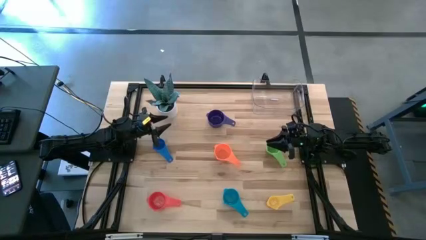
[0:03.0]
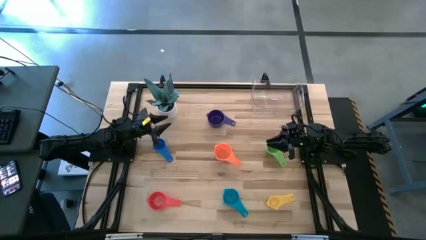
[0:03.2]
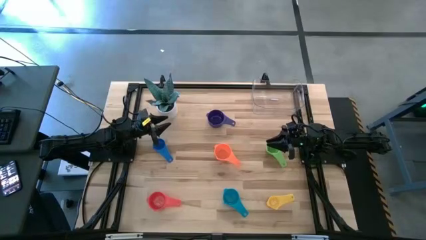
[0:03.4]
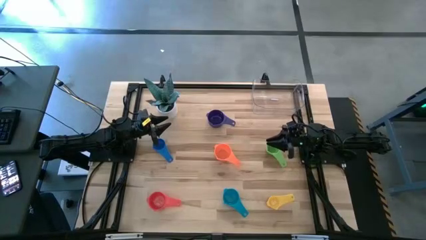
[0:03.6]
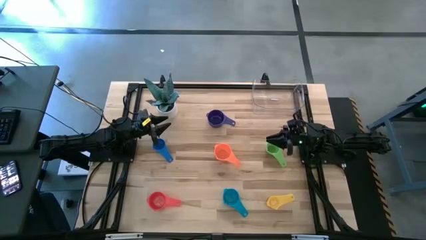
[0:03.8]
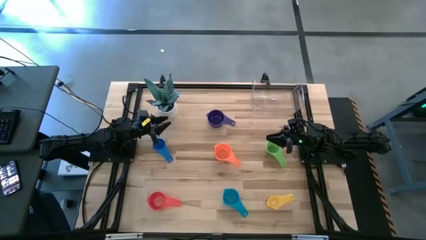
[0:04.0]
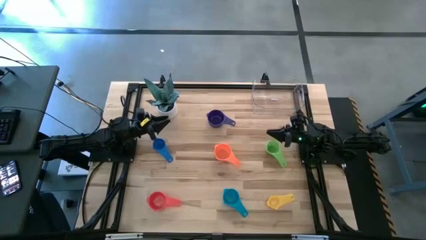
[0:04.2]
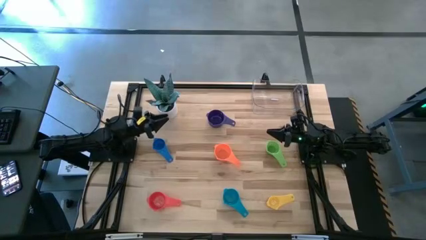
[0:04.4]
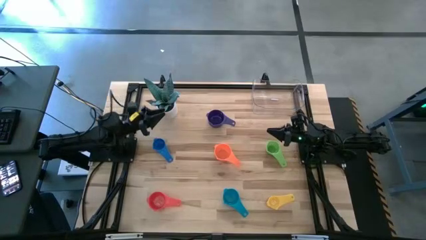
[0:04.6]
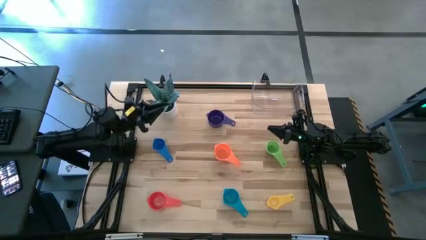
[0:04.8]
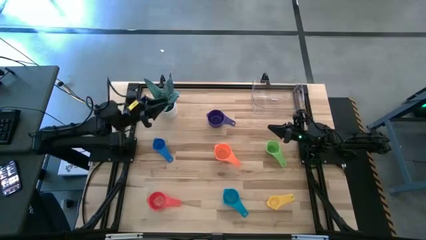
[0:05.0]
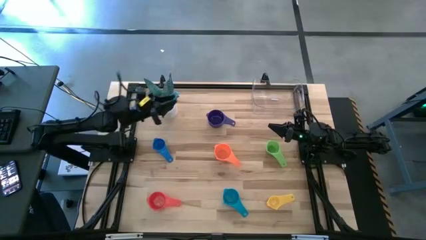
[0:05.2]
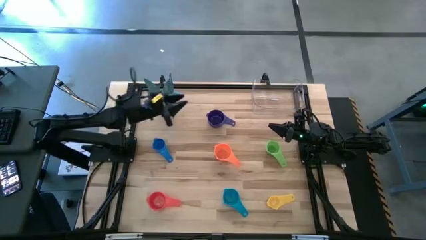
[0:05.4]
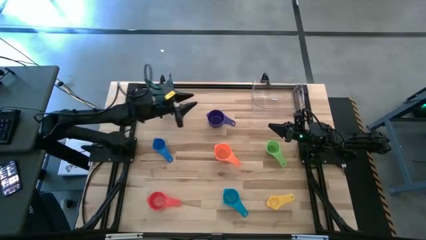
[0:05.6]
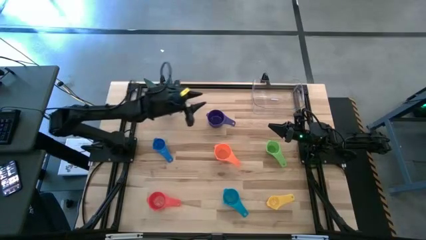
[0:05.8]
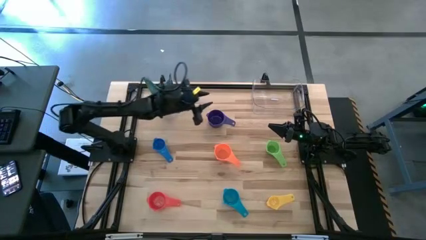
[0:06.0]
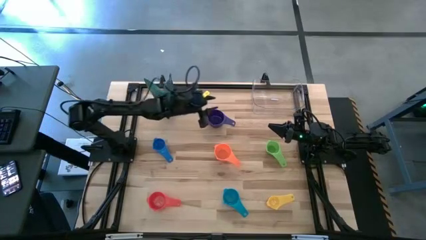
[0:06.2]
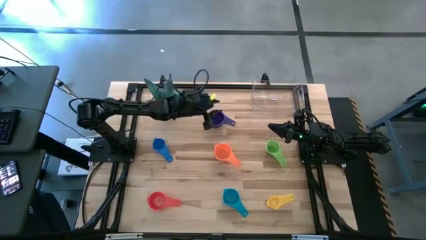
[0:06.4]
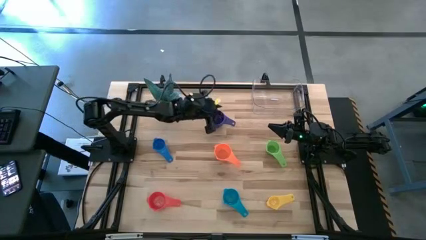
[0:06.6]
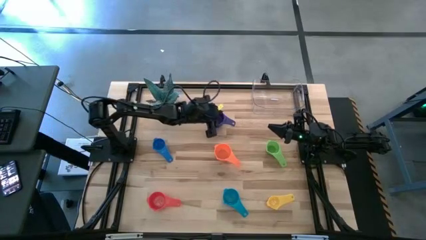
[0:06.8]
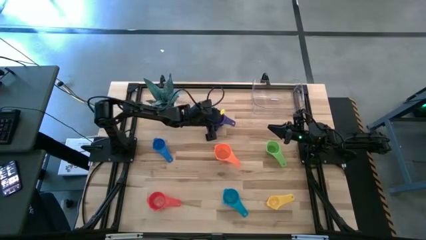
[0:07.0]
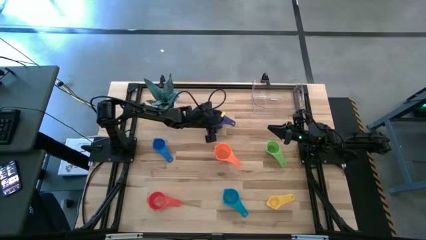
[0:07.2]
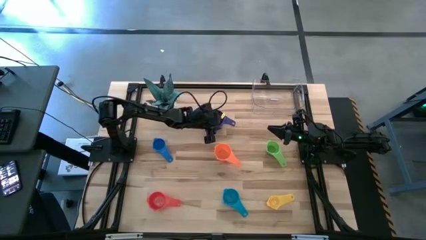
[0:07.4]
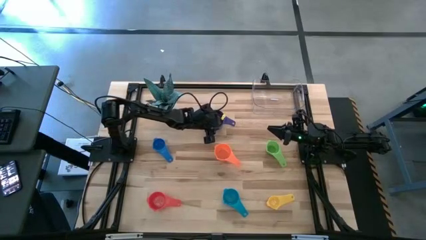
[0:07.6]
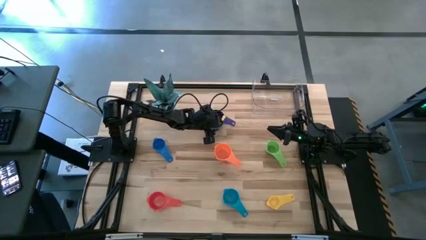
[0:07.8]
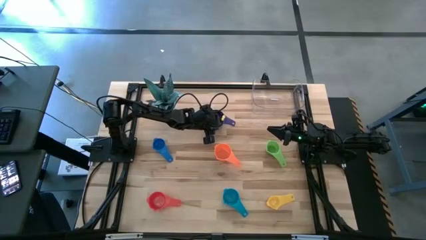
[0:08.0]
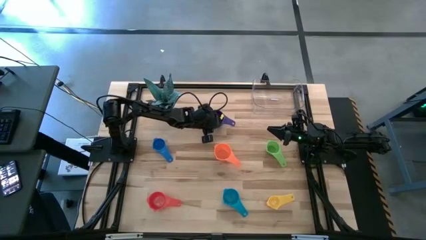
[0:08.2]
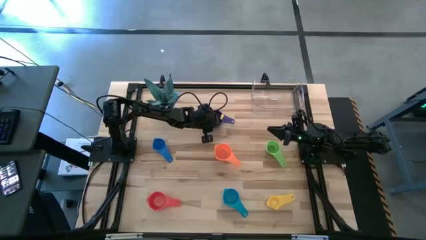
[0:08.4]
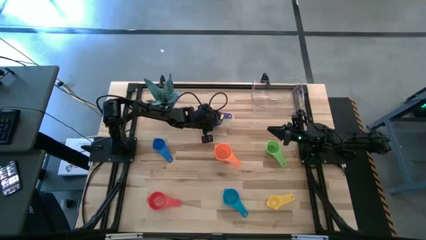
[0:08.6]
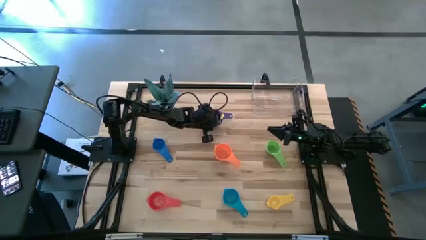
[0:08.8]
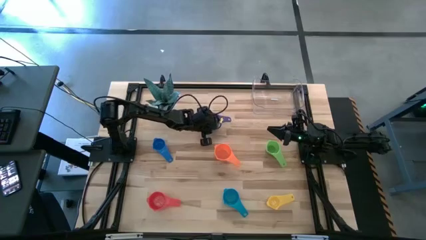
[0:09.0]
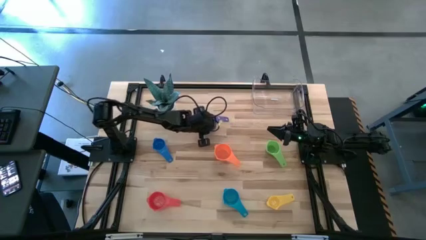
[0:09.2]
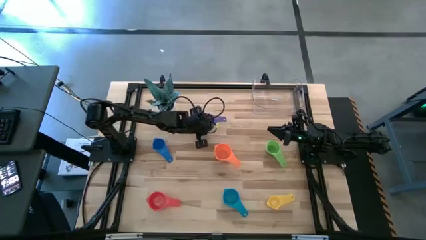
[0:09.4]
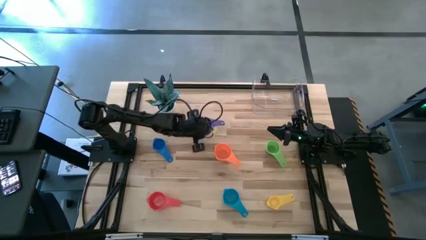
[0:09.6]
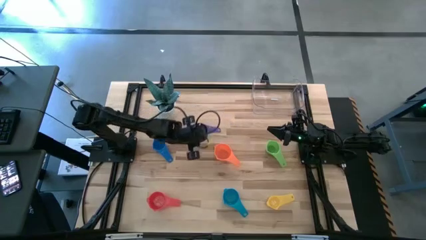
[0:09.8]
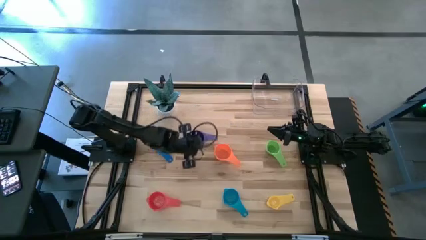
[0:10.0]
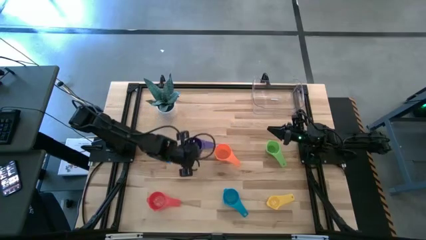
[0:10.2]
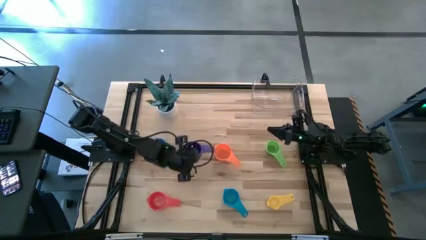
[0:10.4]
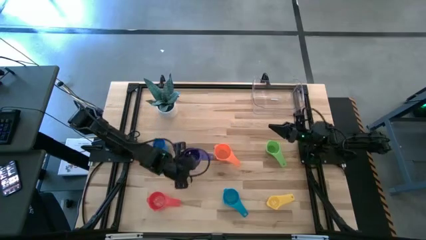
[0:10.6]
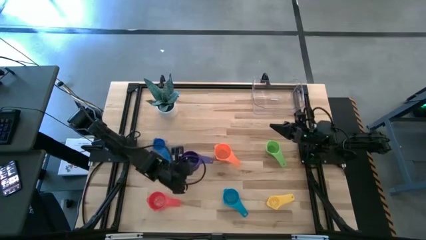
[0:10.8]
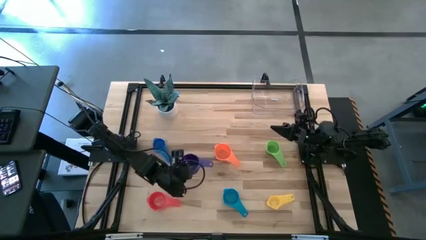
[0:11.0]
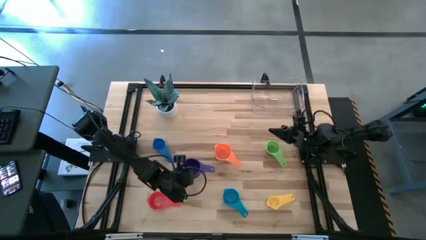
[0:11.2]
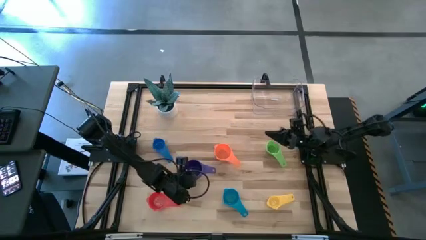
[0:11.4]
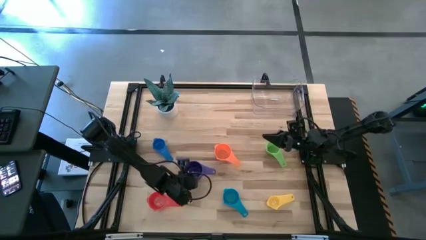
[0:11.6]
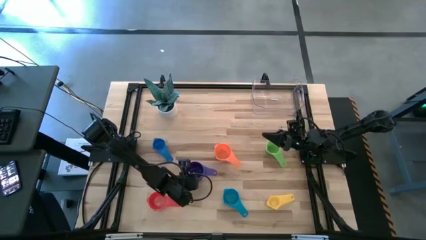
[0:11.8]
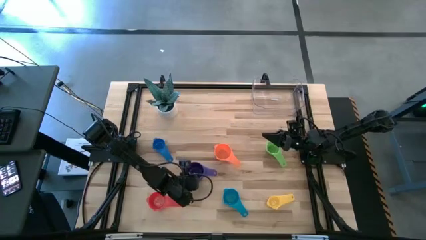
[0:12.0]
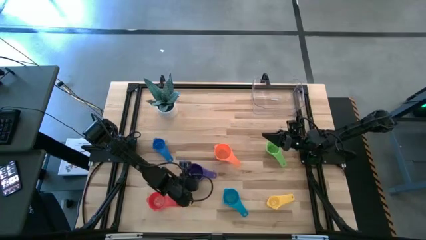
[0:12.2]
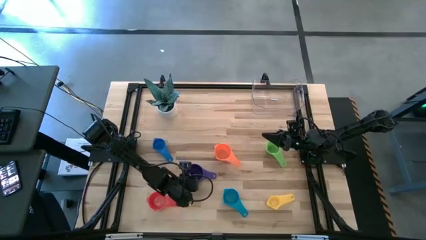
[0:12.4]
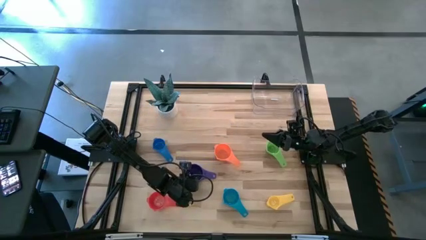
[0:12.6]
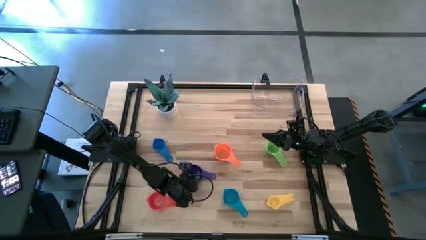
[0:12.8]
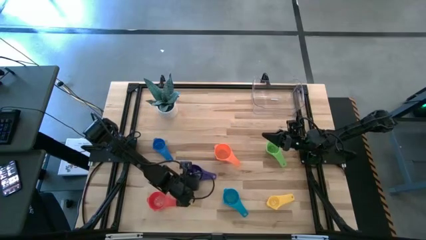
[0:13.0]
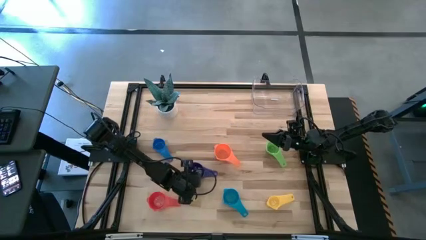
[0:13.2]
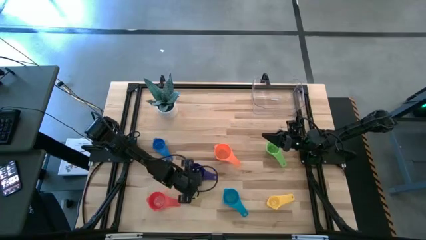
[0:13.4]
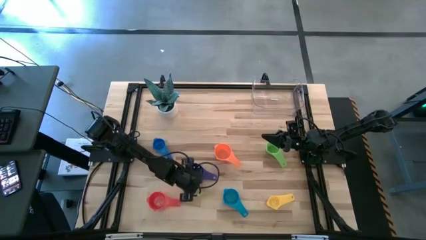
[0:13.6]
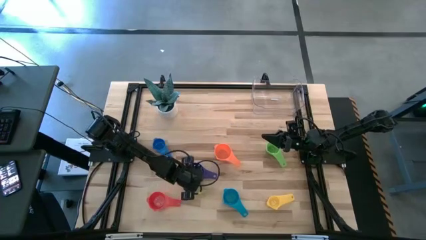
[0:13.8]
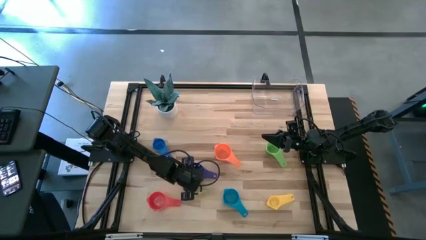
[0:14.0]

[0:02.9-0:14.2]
Task: Nest measuring cups in basket
Move the violet measuring cup to the center of the table
